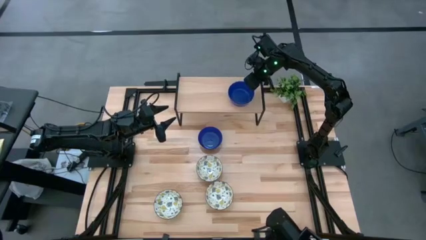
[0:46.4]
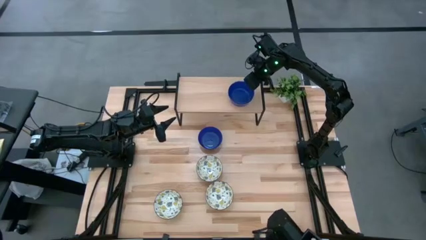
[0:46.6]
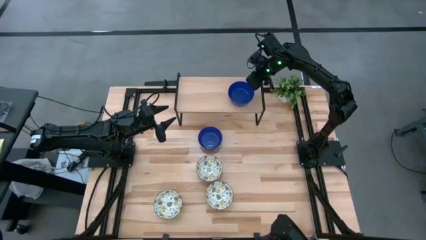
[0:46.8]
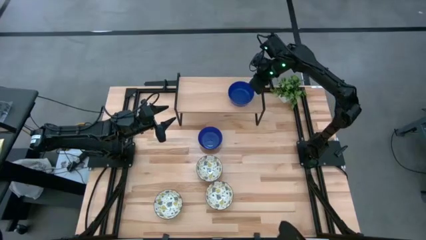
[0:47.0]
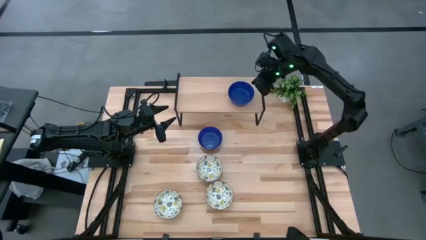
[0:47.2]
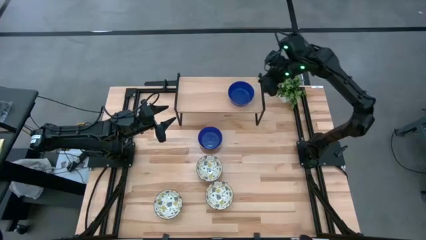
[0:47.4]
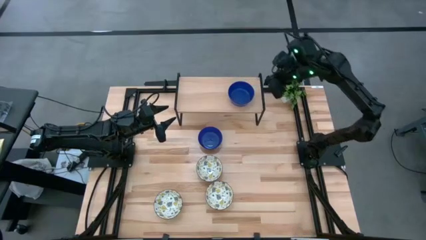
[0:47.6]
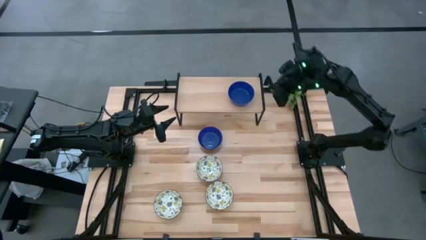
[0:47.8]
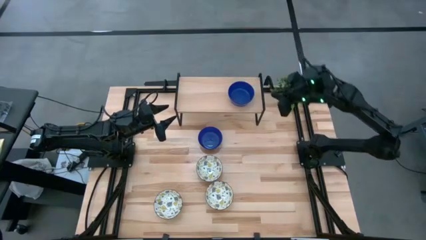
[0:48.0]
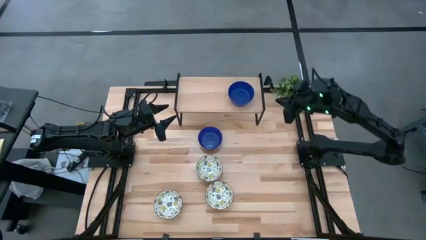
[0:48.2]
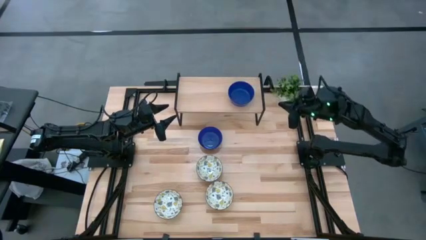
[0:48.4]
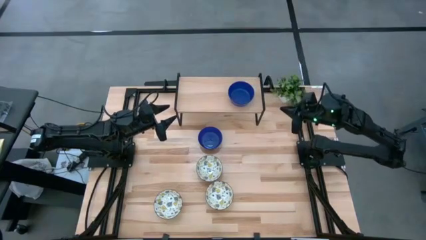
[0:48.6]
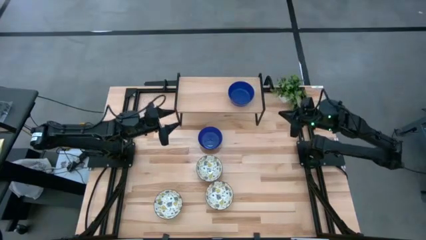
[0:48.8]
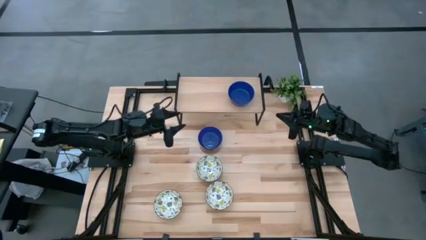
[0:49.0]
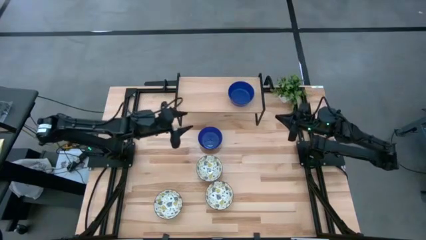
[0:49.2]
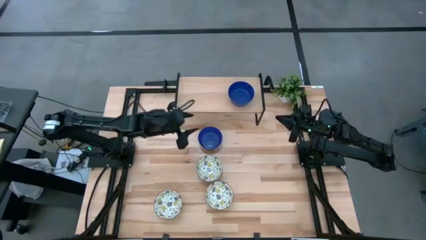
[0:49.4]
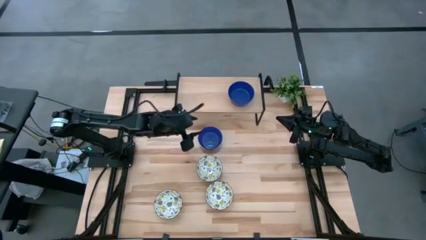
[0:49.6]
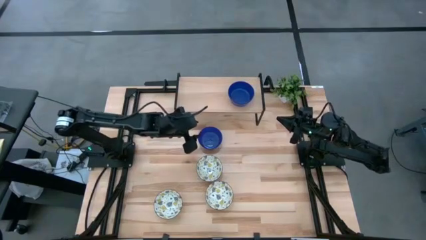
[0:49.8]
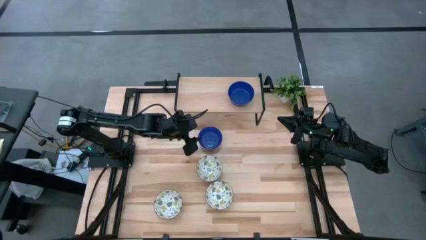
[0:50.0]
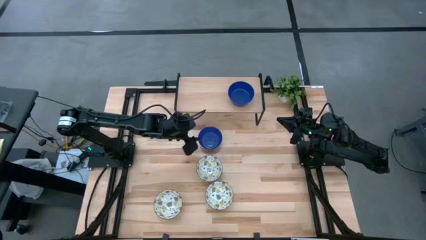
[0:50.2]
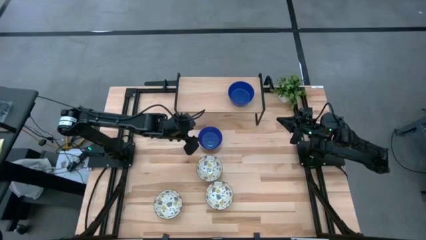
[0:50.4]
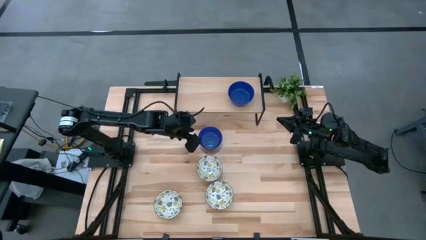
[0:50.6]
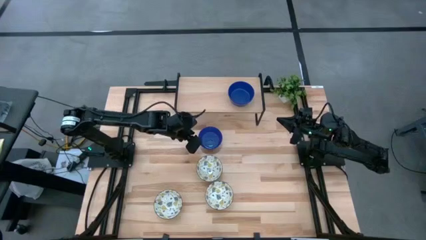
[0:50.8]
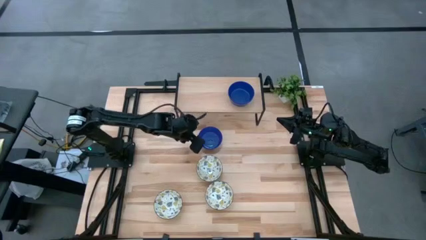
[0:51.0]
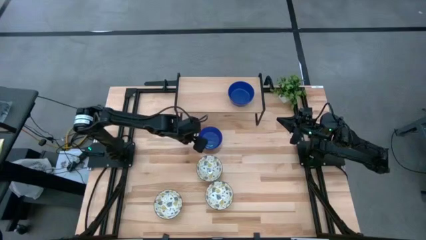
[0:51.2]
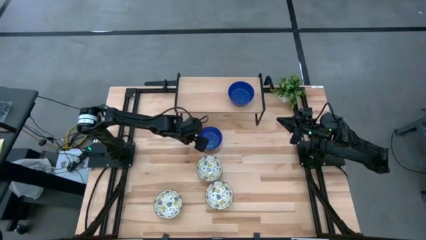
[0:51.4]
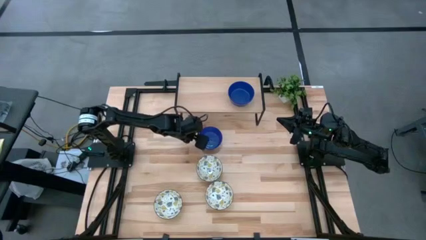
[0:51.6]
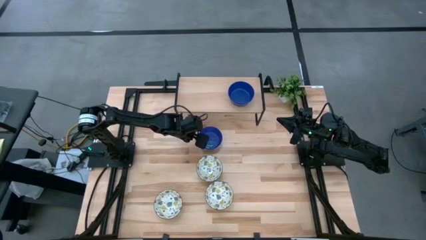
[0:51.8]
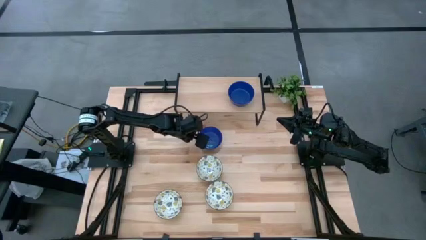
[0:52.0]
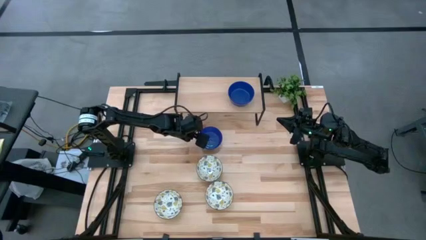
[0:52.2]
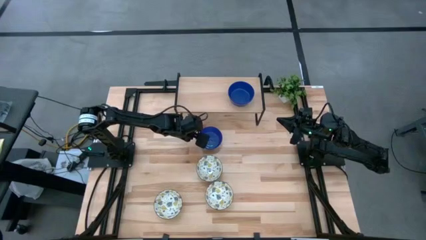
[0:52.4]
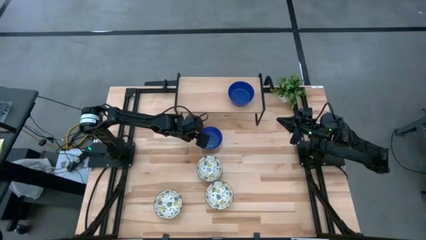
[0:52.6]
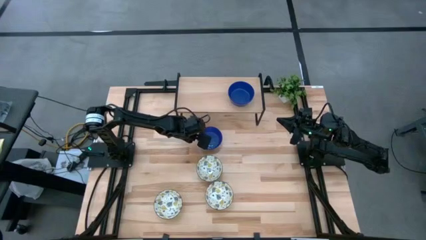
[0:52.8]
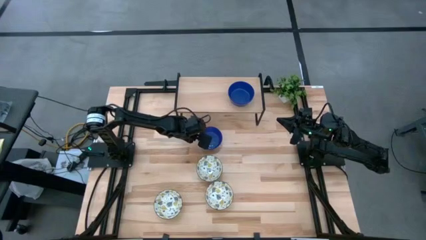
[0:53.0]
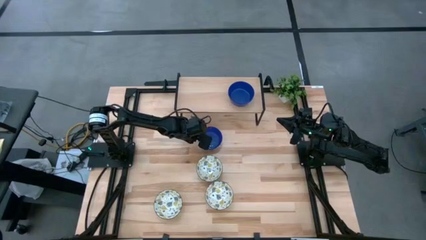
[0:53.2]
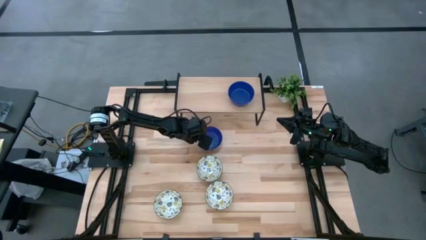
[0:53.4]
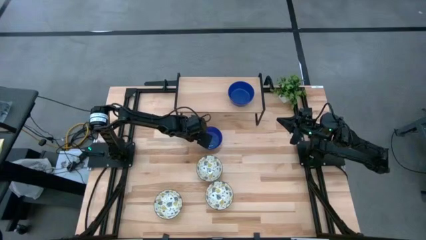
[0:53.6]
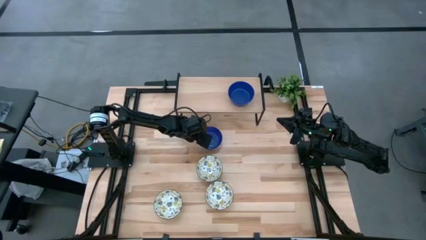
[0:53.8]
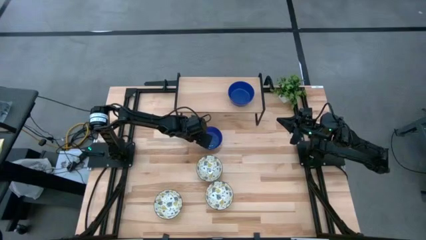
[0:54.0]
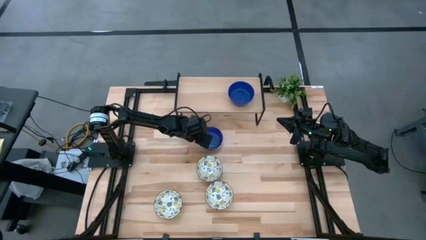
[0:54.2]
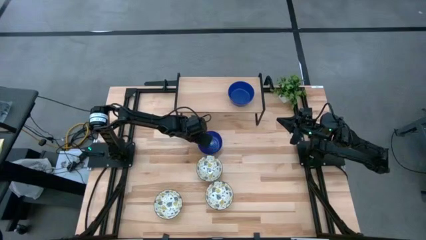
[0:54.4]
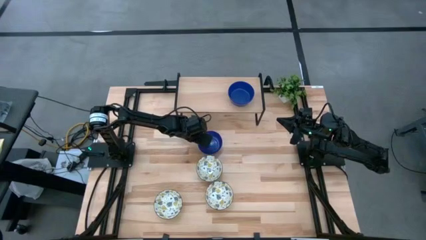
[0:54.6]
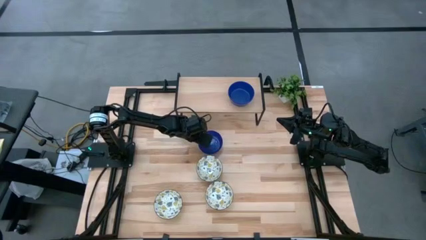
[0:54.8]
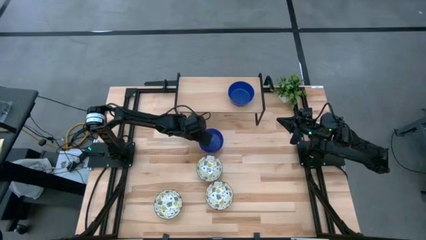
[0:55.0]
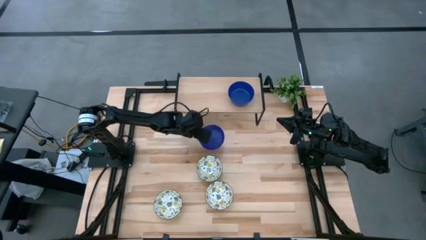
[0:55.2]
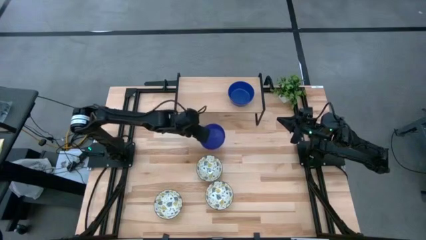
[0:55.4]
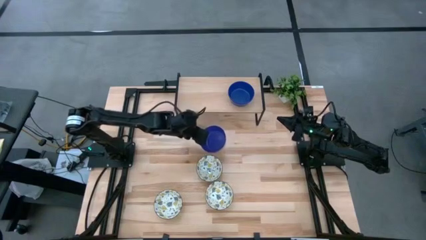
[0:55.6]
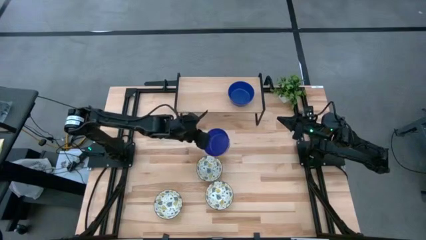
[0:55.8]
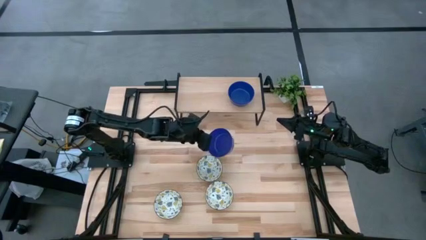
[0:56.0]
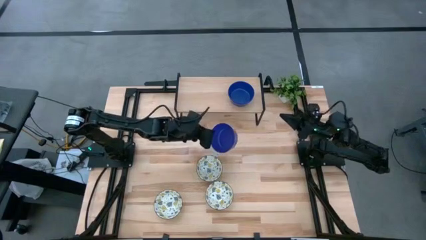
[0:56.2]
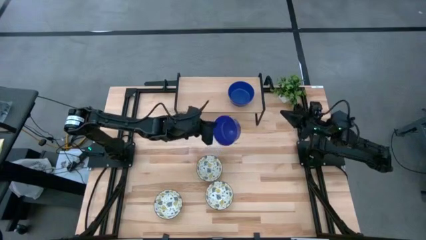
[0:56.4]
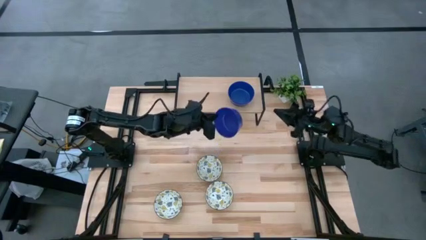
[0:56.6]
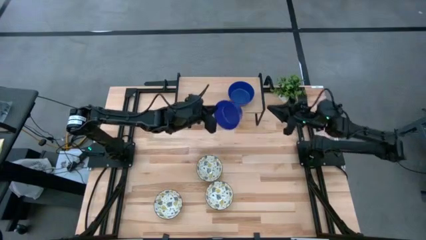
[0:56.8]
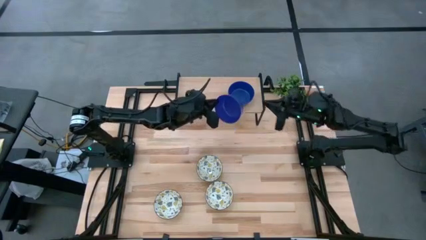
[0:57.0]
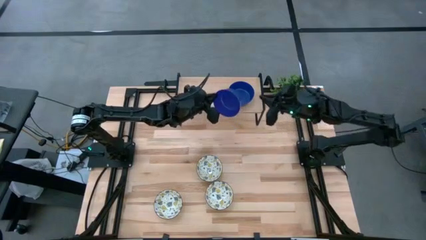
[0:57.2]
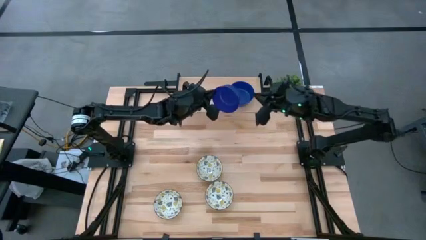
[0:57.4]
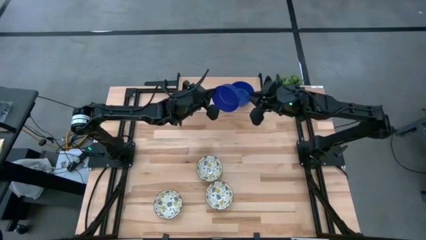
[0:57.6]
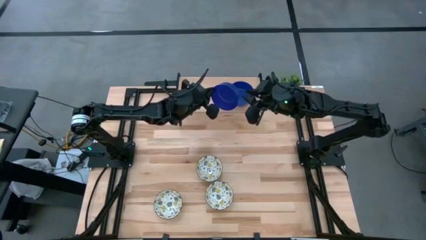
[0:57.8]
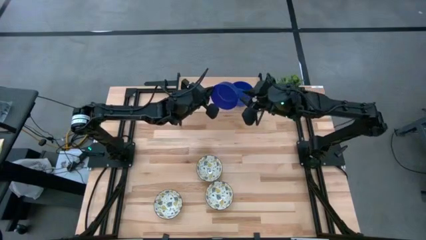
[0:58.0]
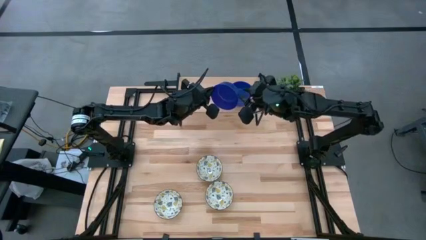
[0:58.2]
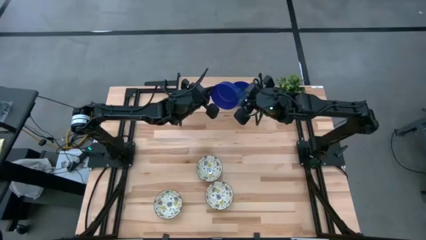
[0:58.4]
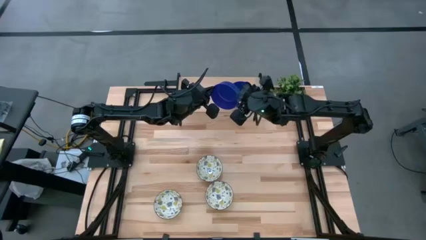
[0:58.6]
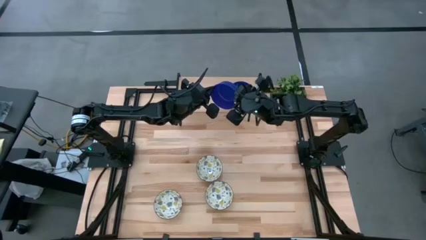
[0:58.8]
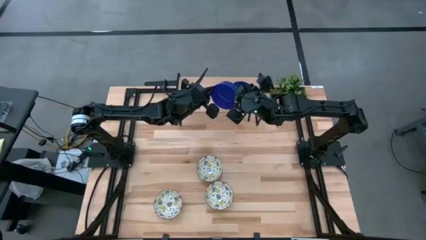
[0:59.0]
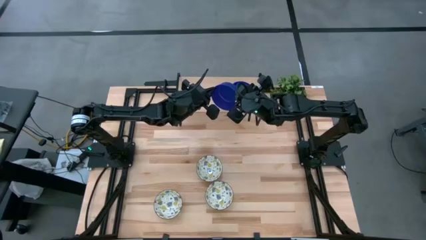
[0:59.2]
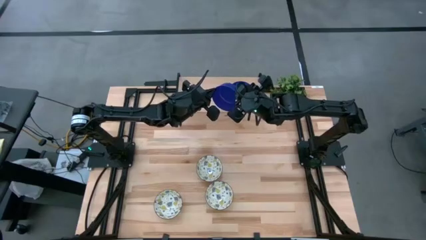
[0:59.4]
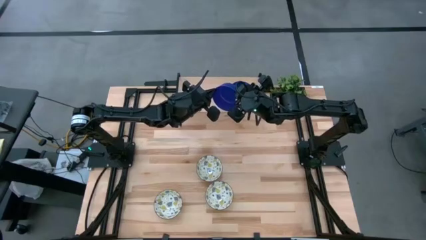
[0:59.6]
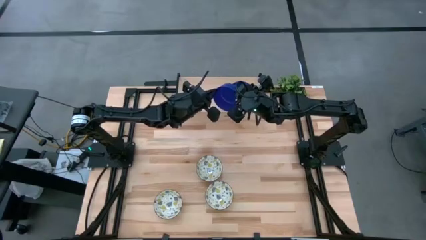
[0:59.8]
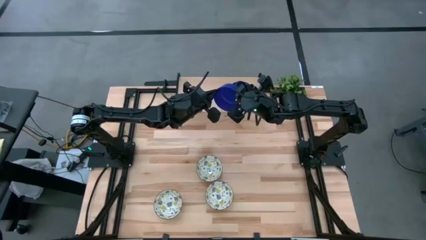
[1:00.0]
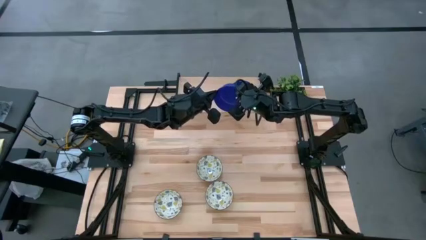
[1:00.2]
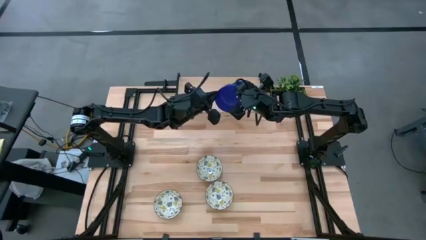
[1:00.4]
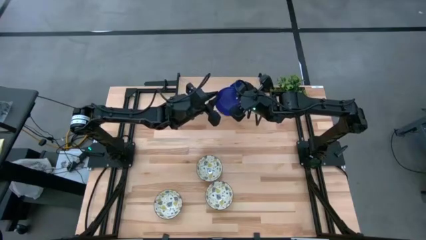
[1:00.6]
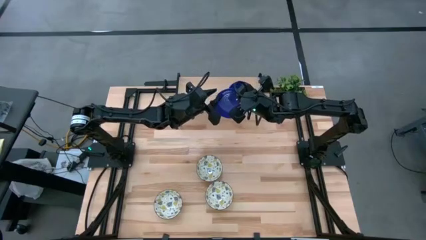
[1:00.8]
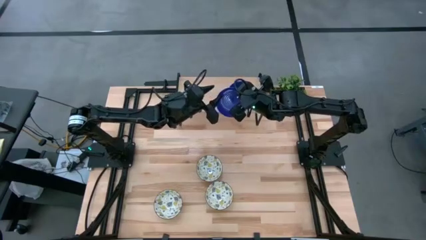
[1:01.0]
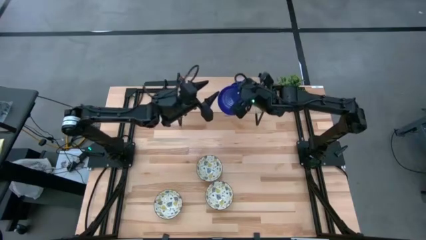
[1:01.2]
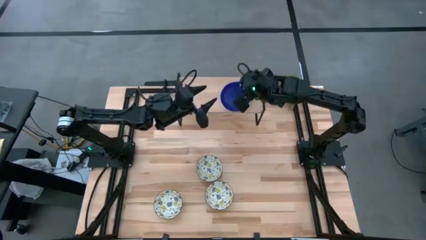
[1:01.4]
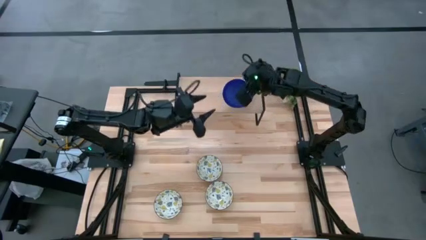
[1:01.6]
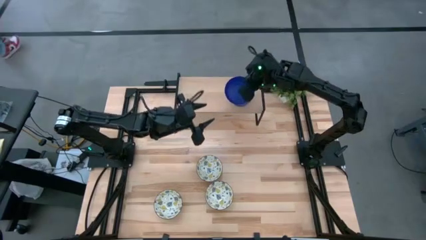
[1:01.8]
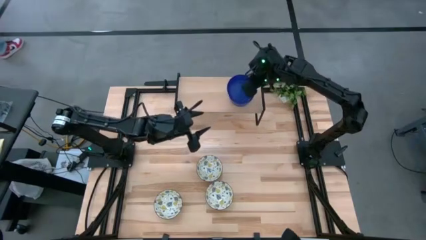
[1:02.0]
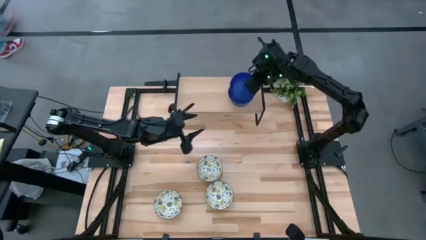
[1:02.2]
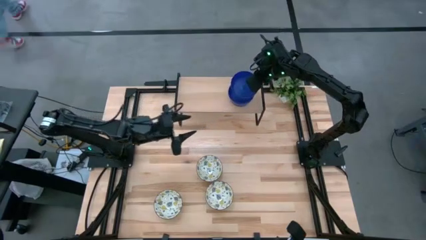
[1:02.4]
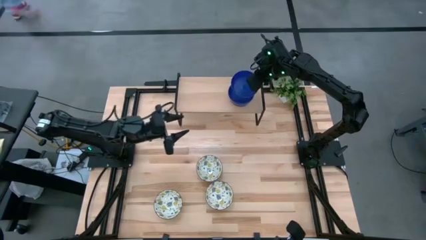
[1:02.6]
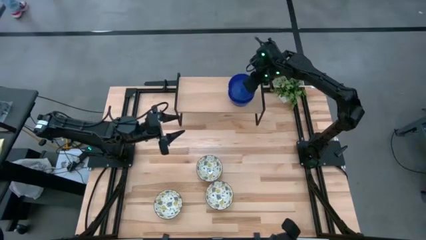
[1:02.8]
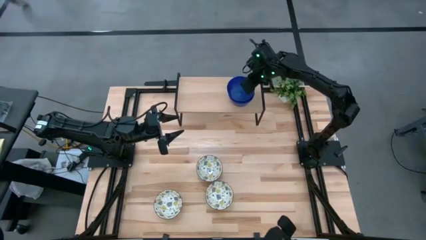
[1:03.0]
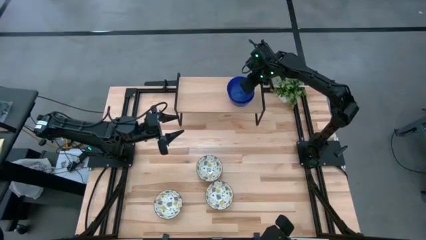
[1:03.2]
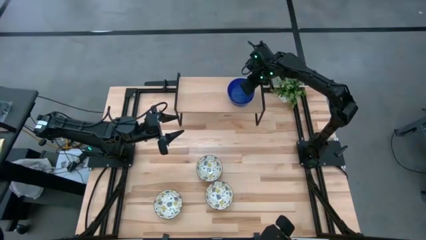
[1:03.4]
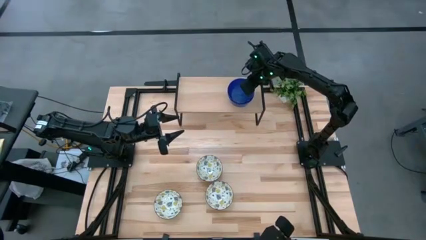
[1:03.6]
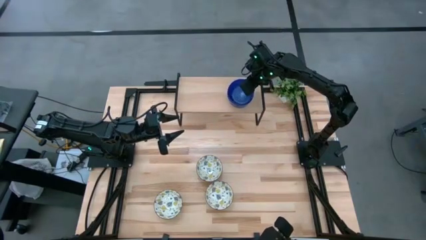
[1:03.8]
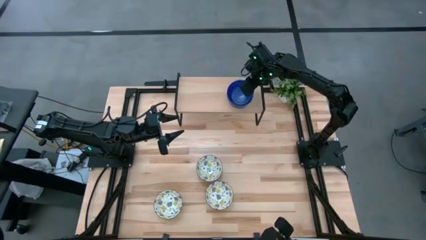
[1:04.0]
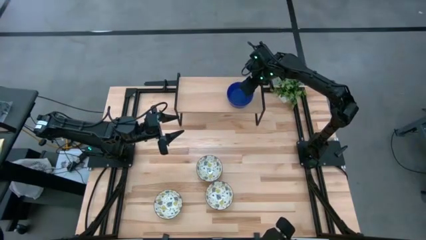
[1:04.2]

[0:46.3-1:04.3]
Task: Pick & Place Mini bowls
Stack the blue bowl on the blue bowl on the shelf
